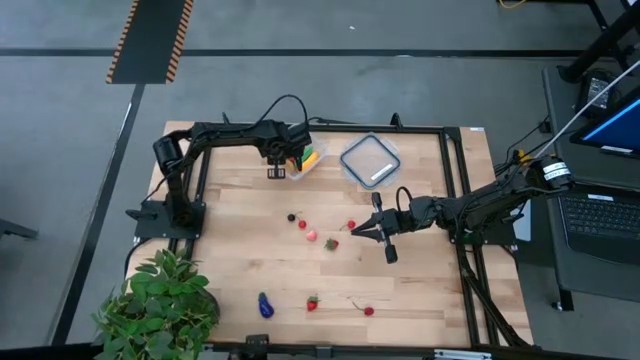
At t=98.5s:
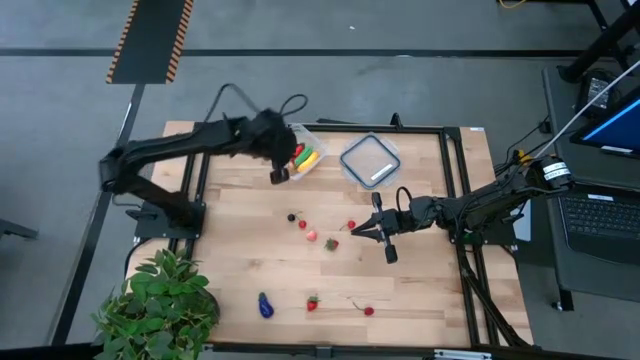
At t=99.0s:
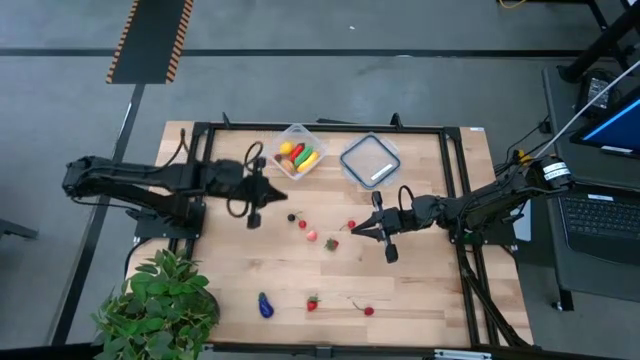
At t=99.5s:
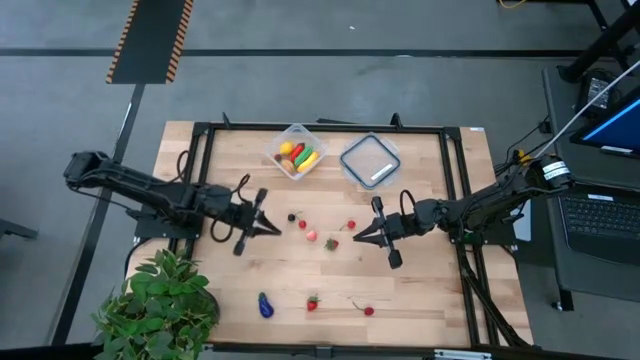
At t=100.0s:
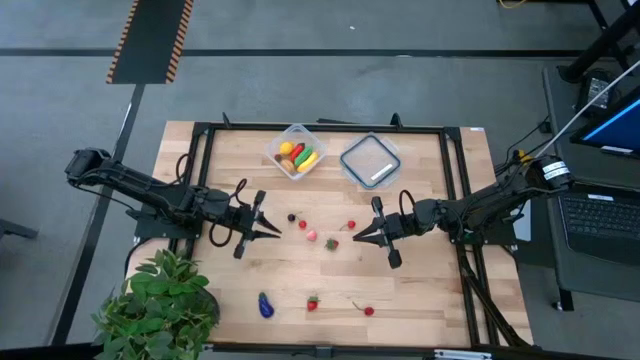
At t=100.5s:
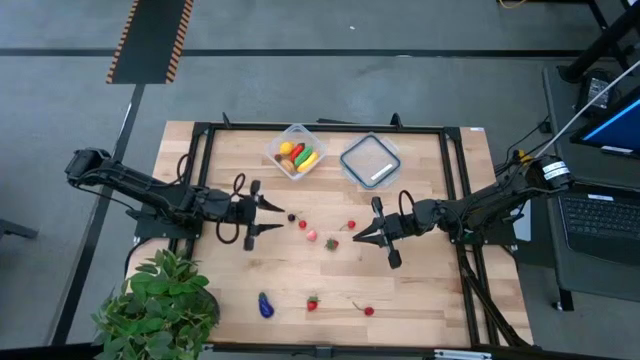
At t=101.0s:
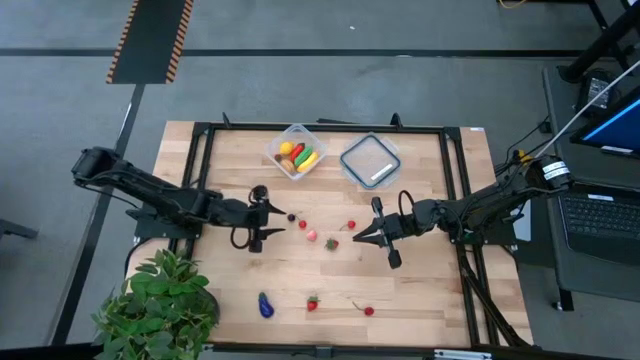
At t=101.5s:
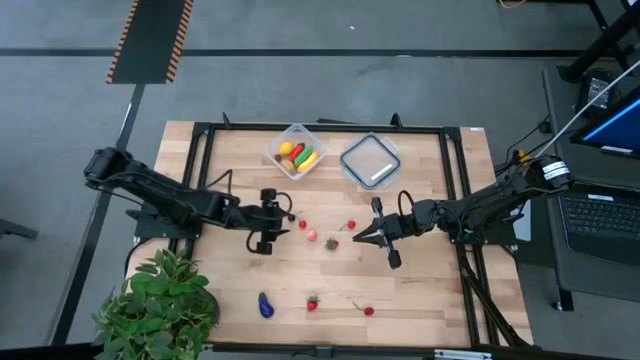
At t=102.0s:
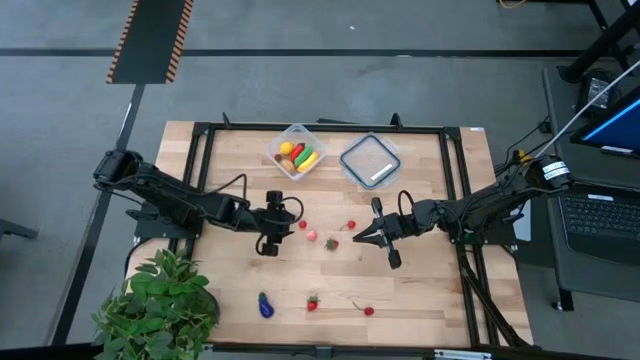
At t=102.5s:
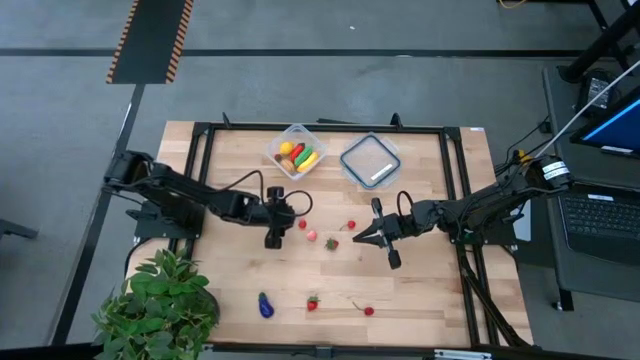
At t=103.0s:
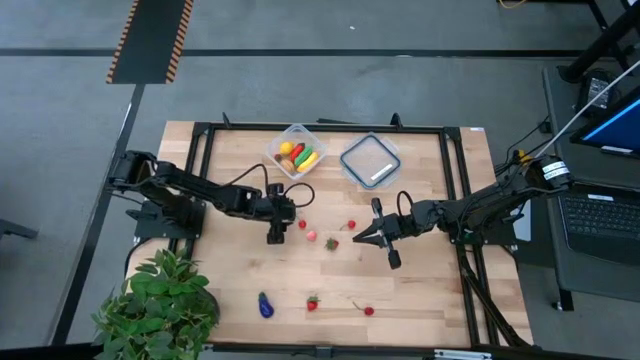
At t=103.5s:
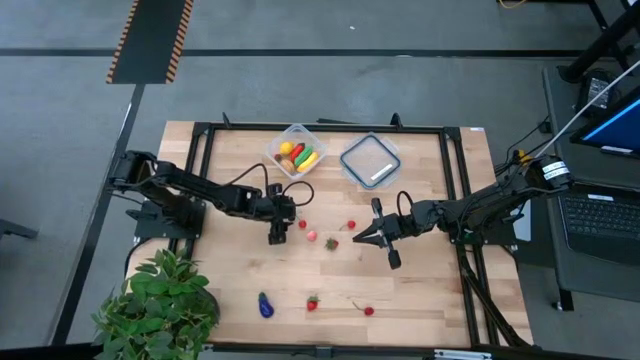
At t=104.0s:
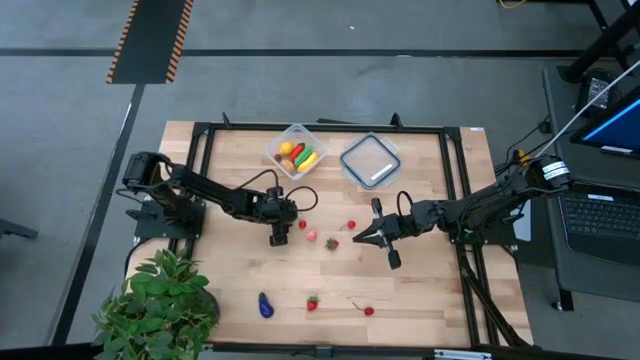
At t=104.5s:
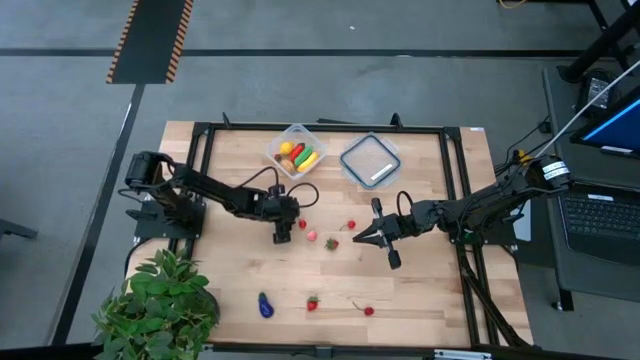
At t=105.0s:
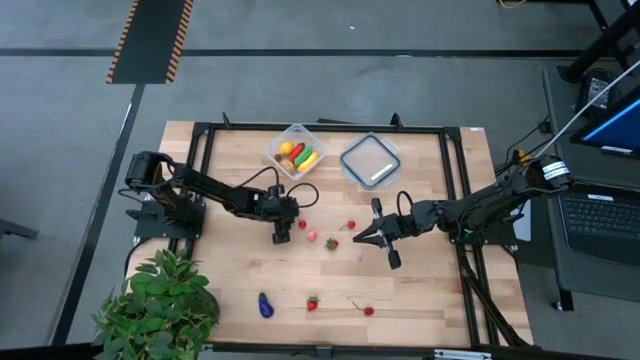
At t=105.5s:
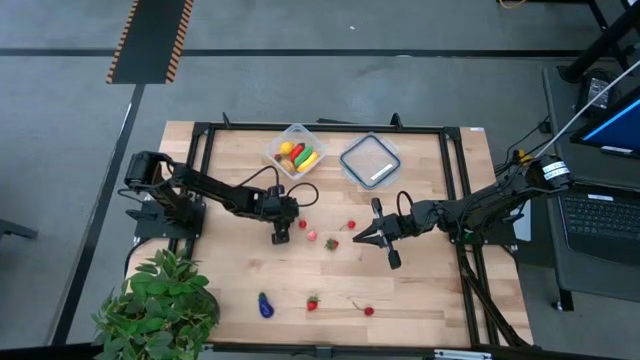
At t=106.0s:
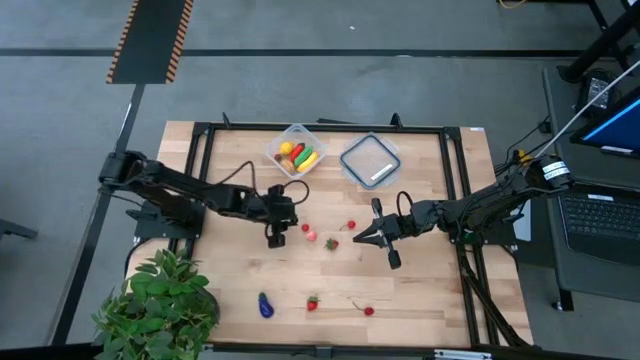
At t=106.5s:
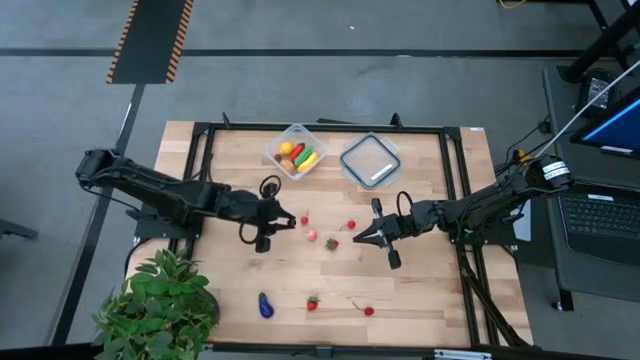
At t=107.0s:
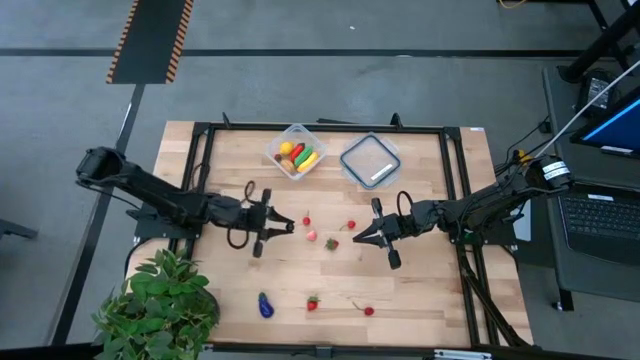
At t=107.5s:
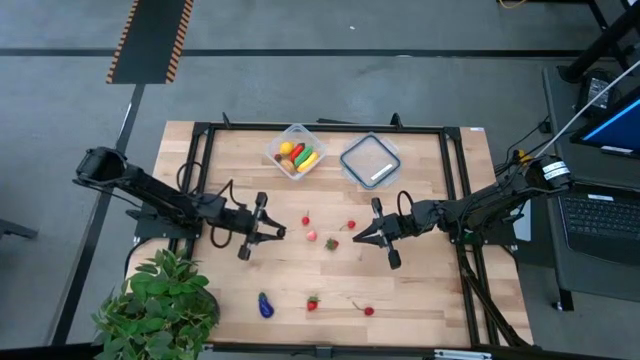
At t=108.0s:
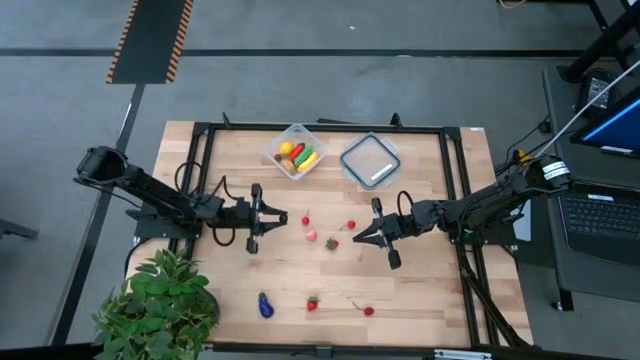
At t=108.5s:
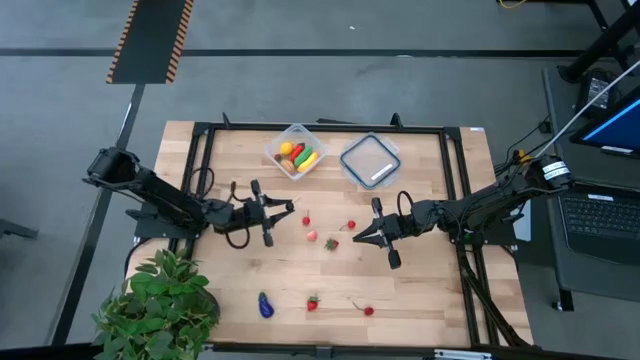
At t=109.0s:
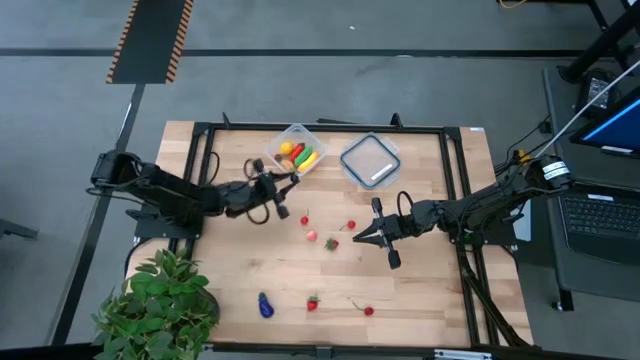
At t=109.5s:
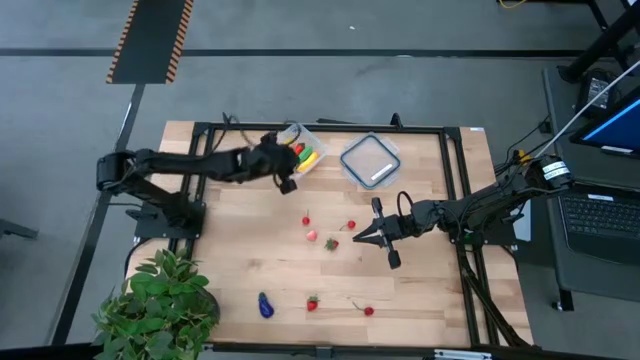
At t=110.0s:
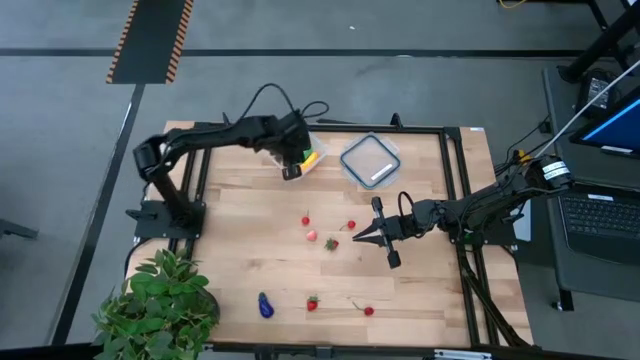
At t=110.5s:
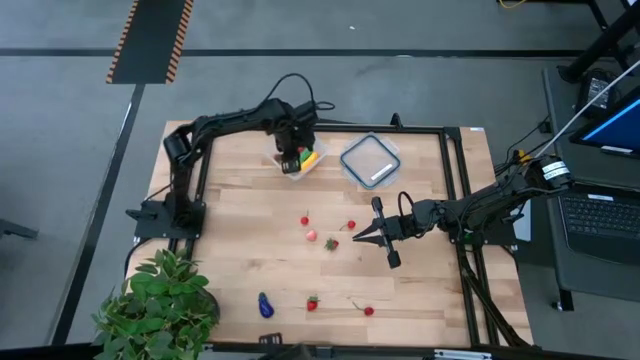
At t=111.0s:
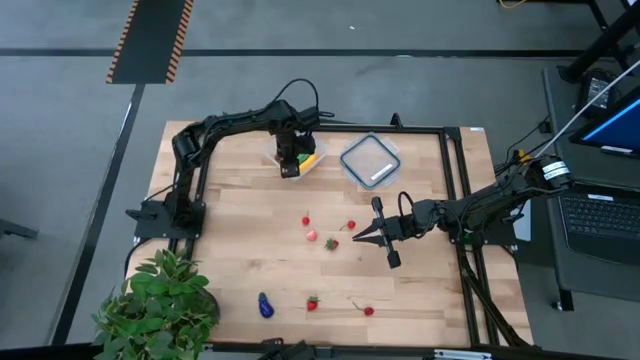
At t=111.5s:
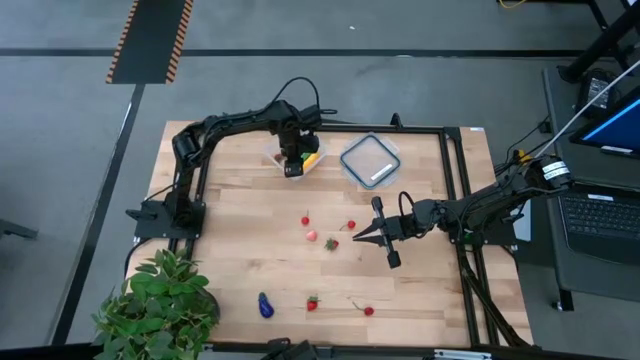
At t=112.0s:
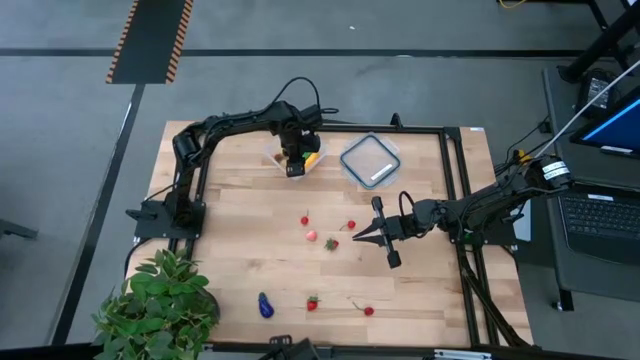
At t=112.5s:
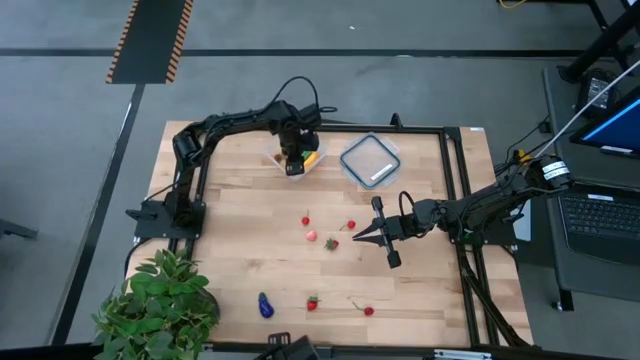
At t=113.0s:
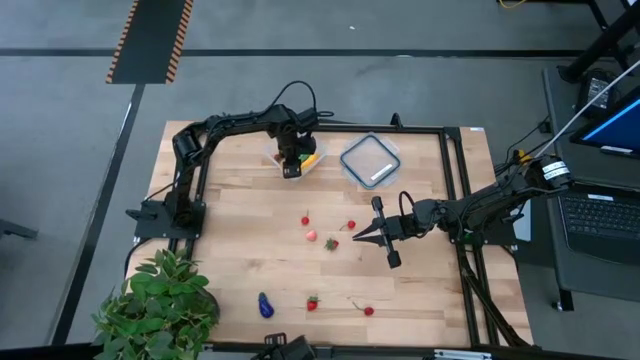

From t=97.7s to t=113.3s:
Task: Pick and placing Produce into tupperware
Put the black cherry into the transparent container

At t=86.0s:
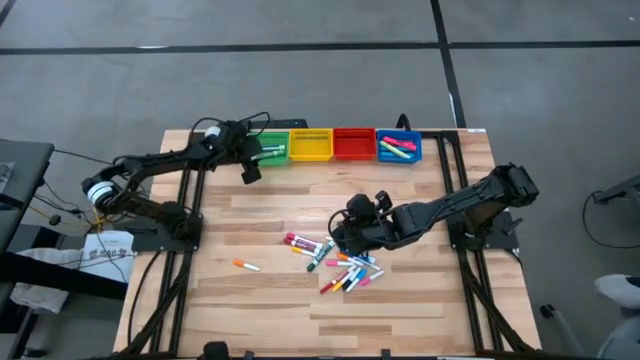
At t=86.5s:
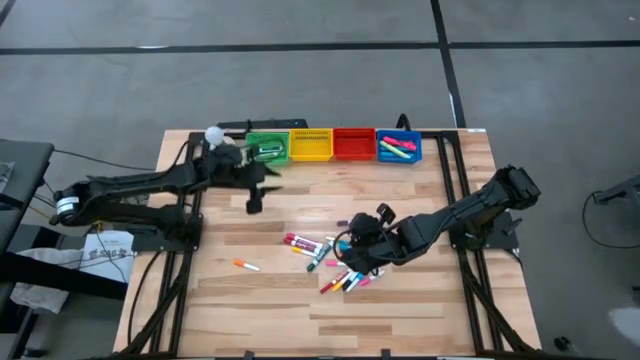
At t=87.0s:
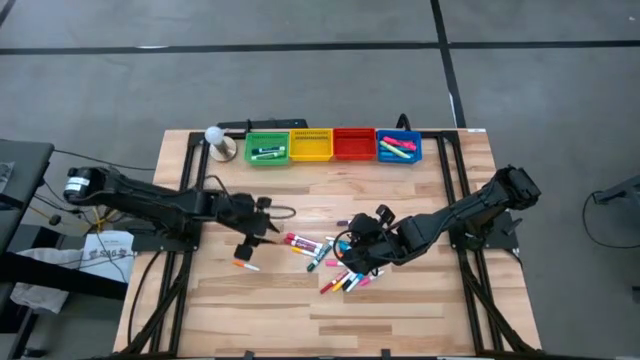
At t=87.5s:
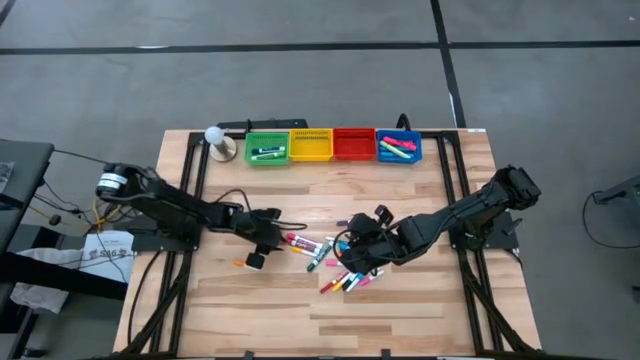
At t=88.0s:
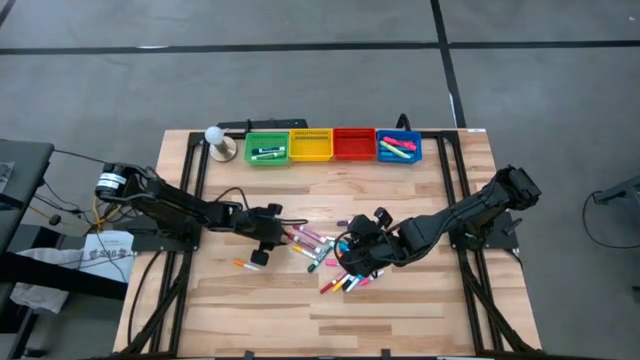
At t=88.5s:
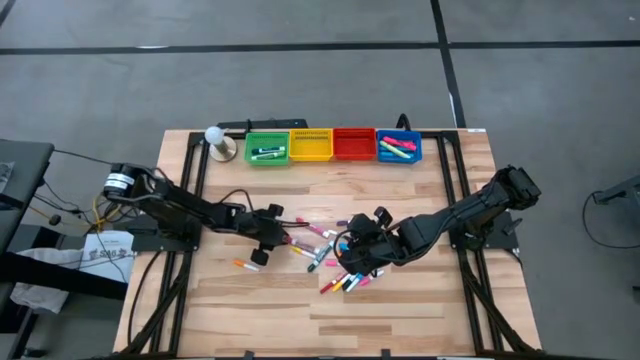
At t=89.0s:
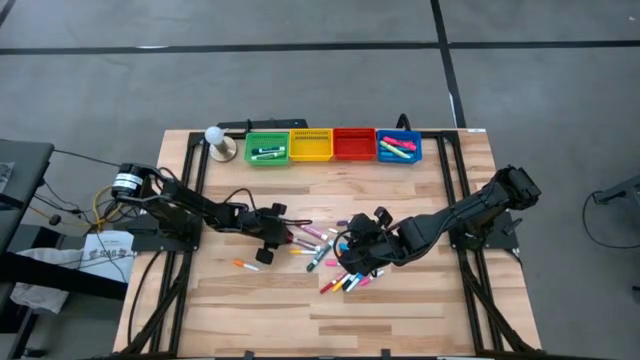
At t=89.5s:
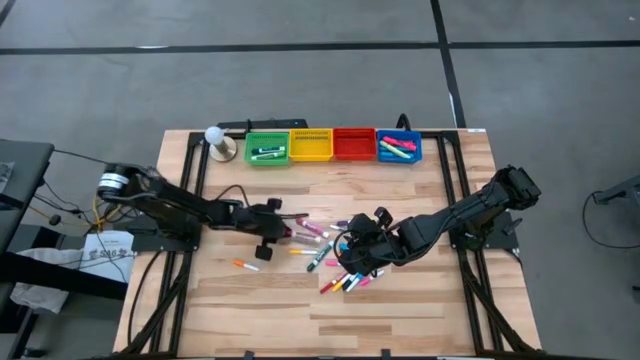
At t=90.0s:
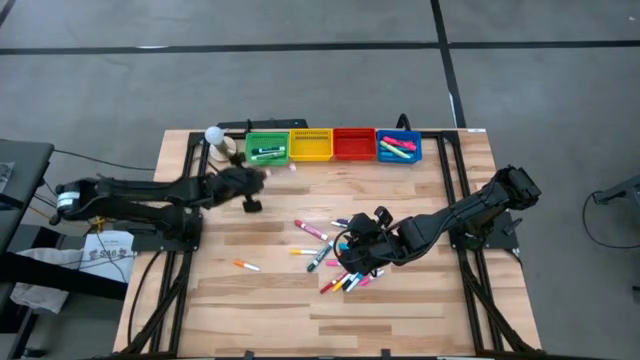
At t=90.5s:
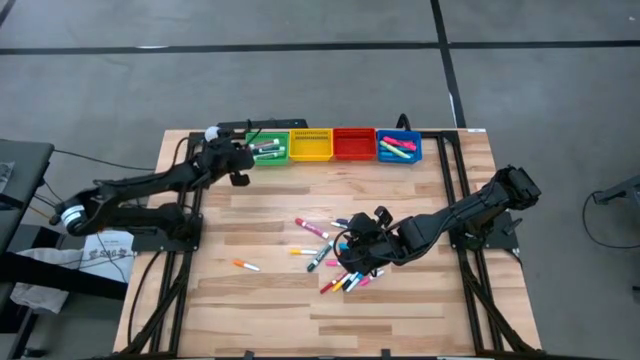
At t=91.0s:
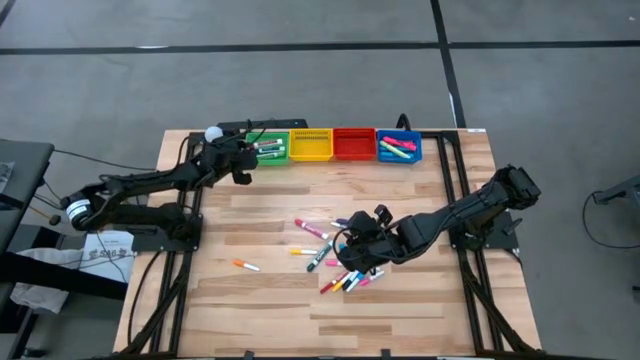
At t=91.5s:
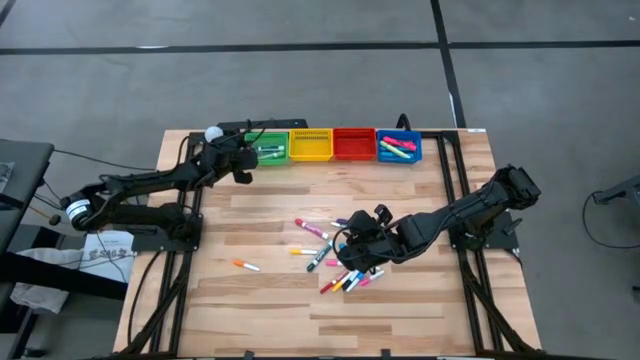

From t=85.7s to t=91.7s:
Task: Pick & Place Markers
Put the red marker pen into the green basket
